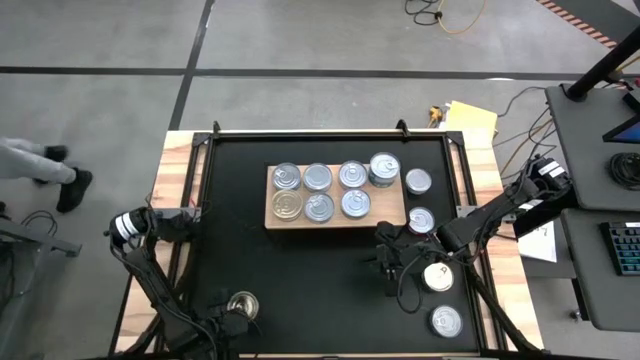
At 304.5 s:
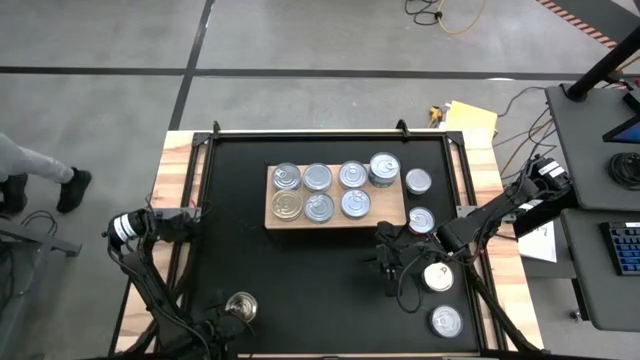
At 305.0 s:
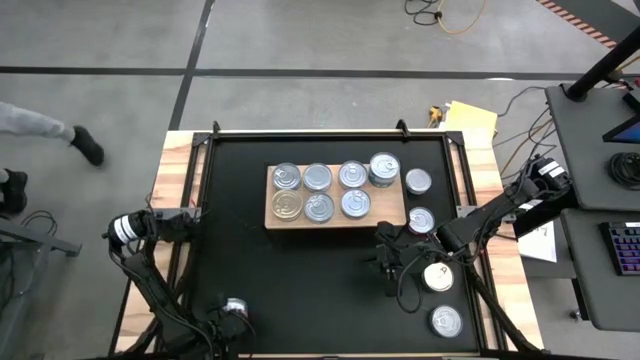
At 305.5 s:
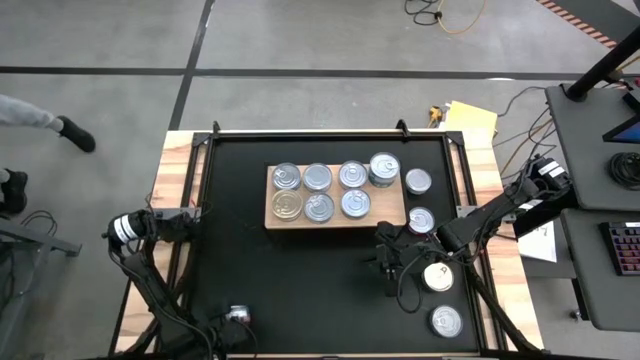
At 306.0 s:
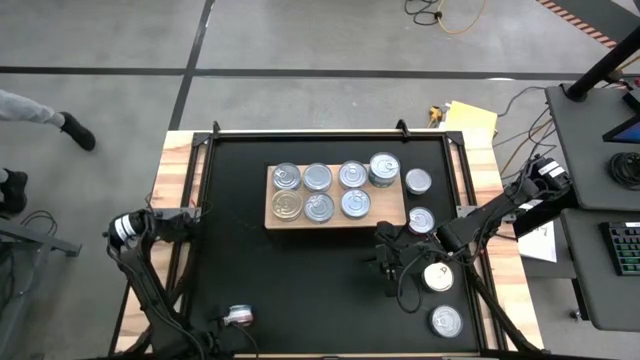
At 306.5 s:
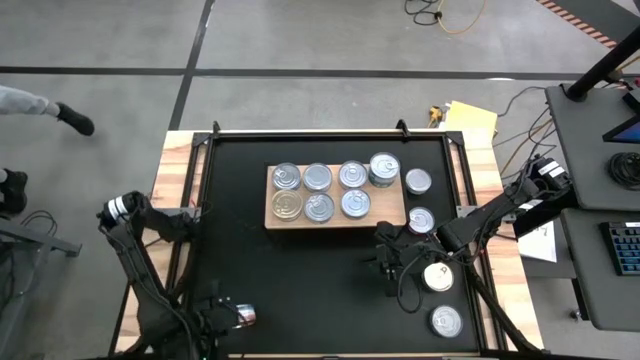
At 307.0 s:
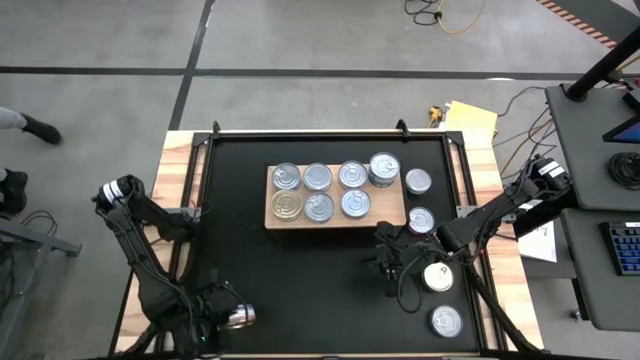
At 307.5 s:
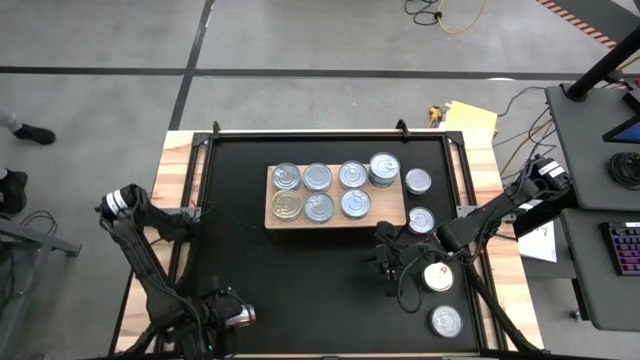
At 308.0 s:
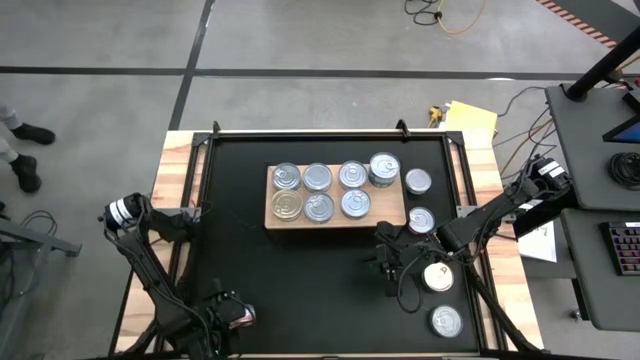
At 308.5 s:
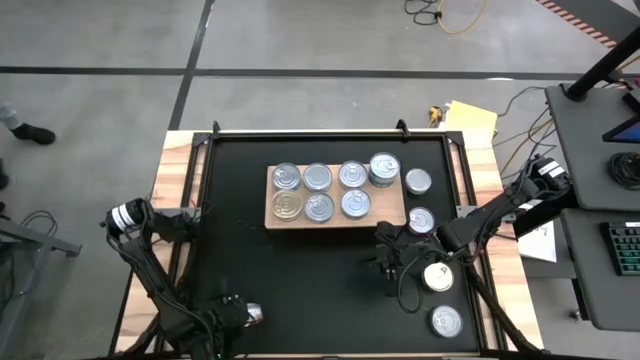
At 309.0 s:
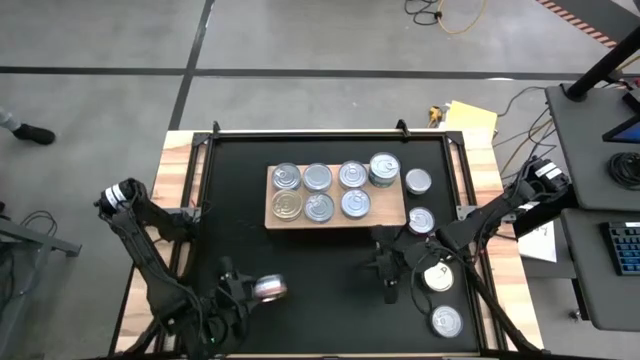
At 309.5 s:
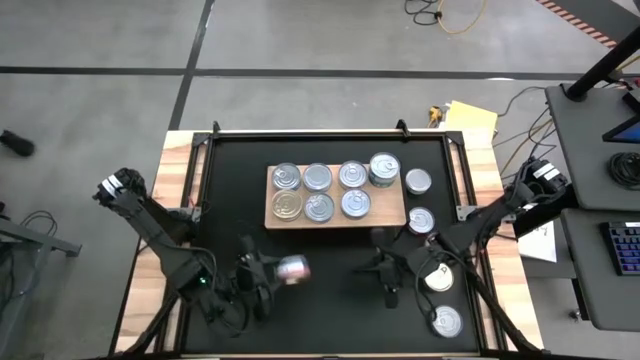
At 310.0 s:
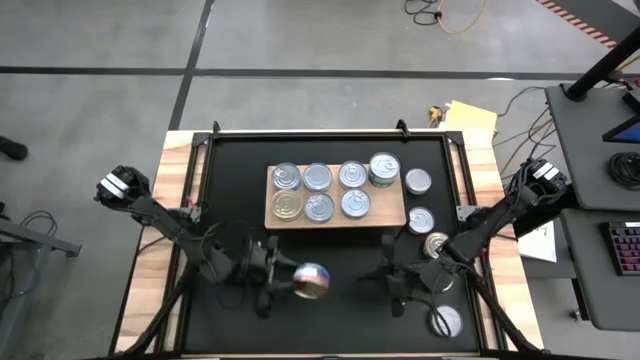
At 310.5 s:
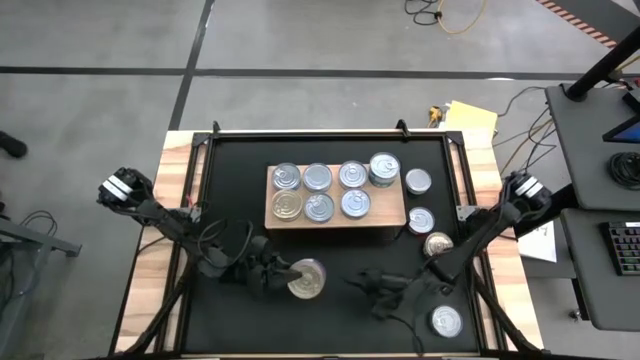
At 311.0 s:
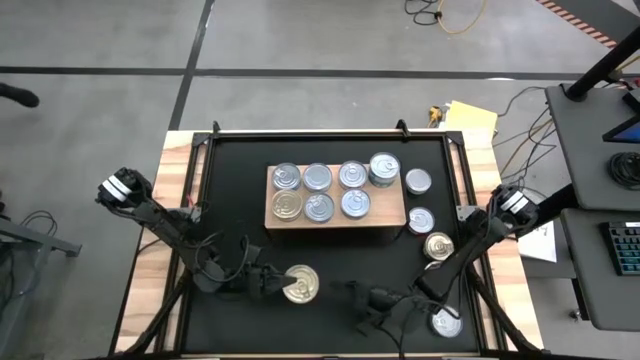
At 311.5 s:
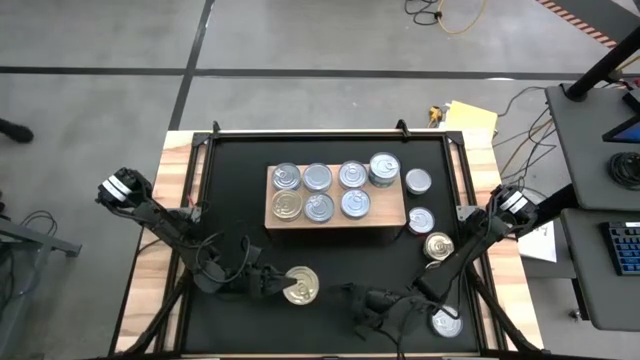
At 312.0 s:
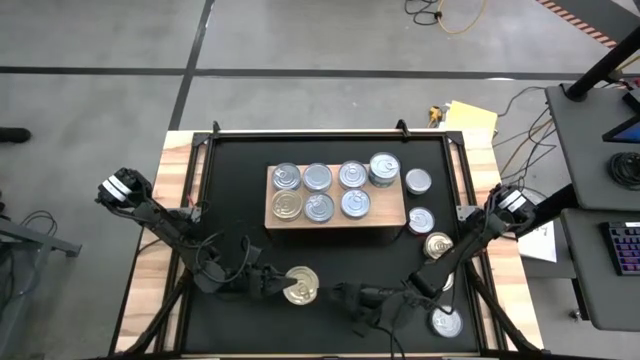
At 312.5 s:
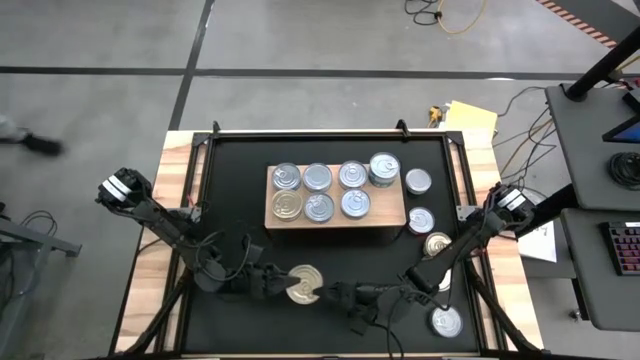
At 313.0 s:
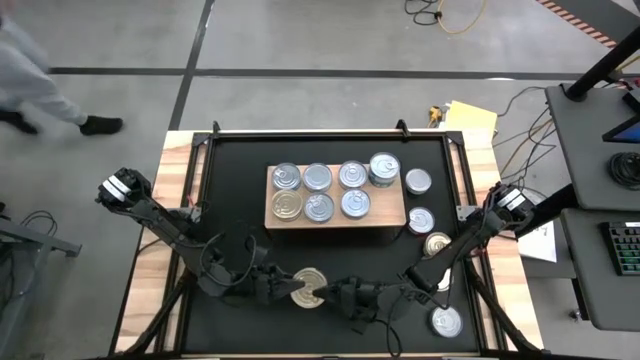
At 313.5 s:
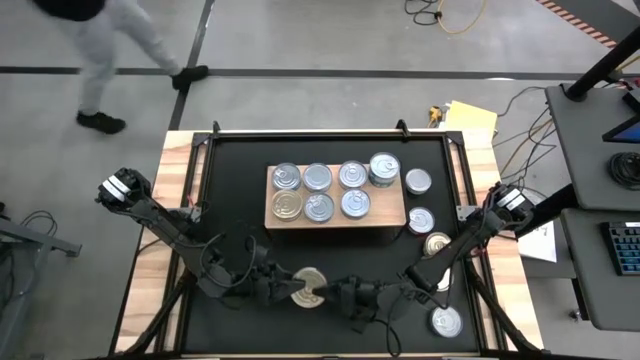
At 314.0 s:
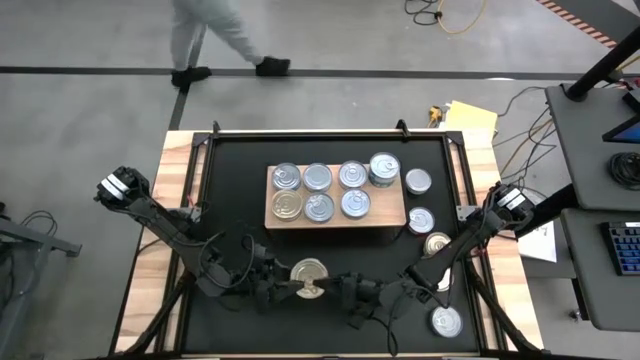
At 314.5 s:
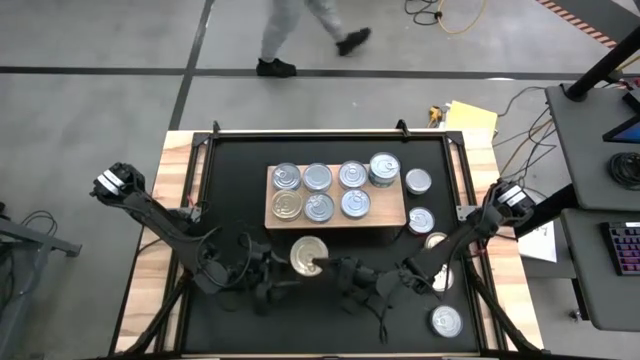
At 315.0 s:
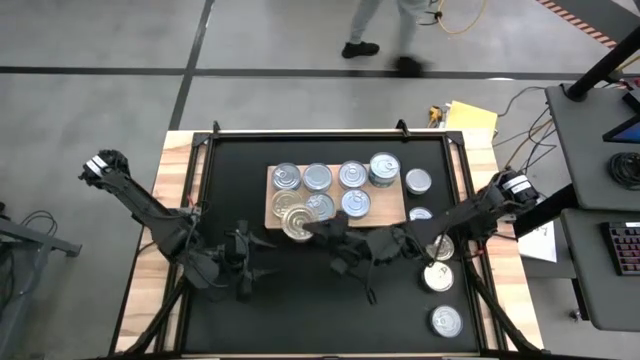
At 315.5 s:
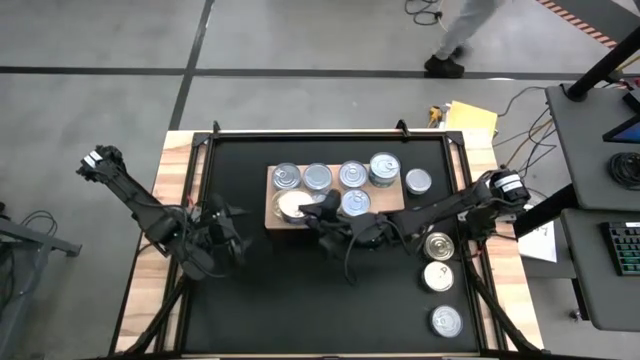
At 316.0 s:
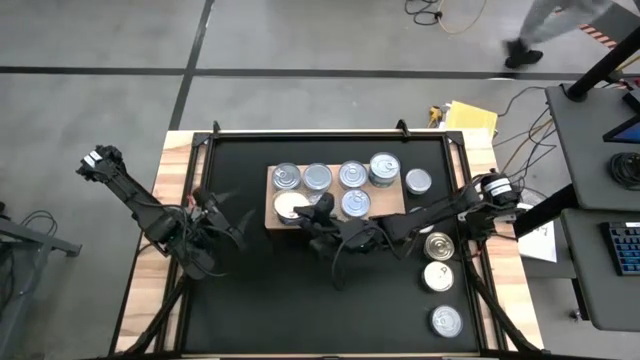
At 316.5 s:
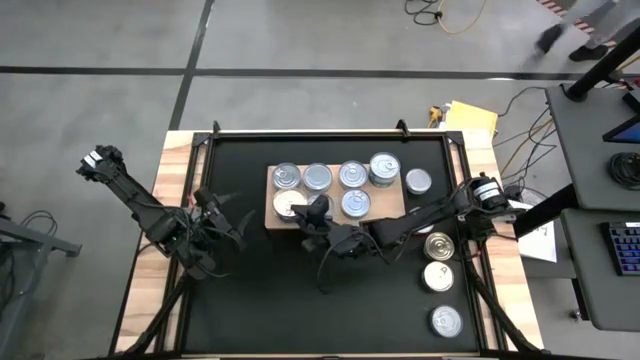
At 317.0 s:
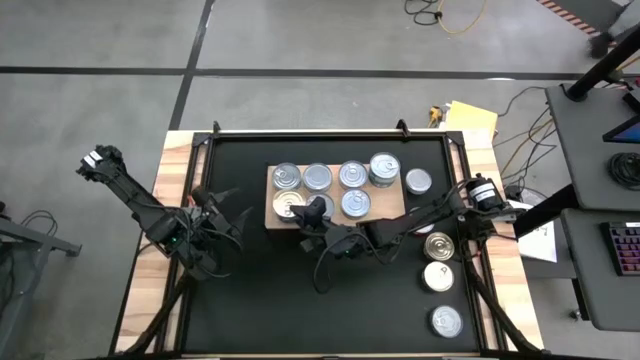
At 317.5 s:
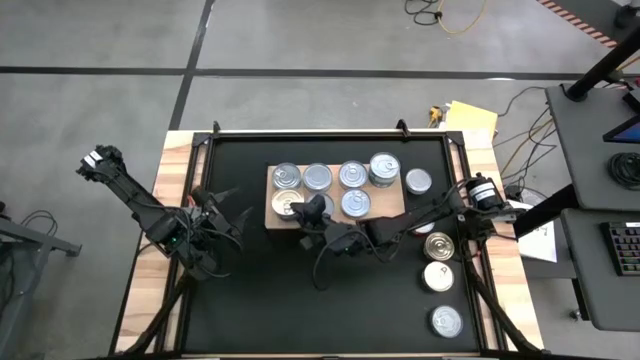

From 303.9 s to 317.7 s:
Task: Stack canned seafood by type on shelf
Stack the blue tuna can on the blue tuna can

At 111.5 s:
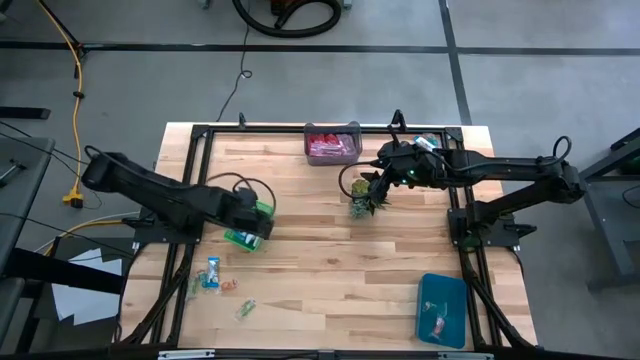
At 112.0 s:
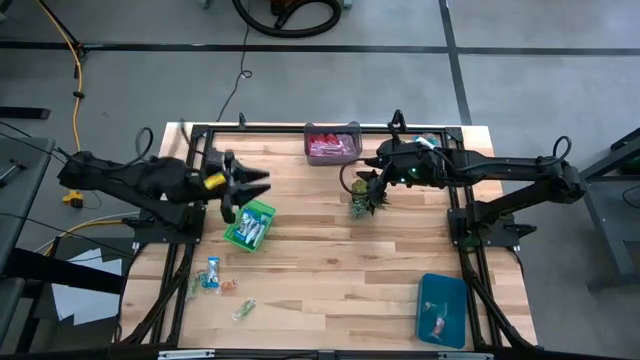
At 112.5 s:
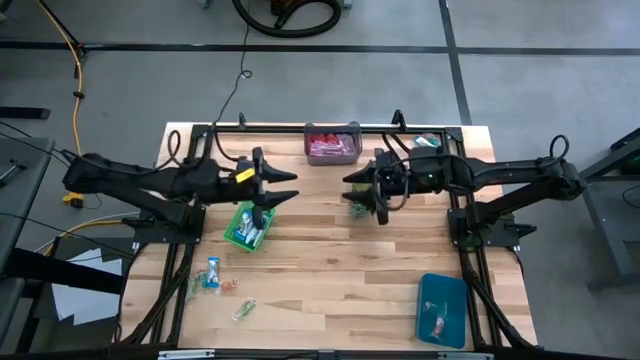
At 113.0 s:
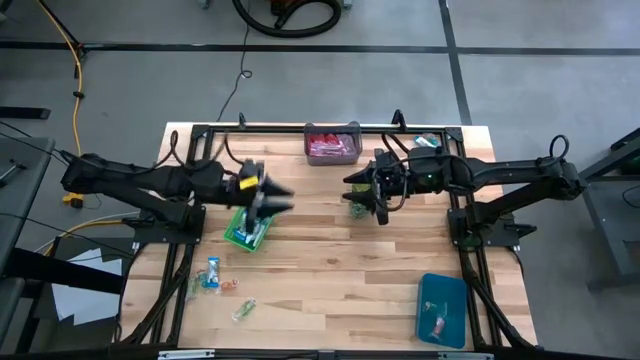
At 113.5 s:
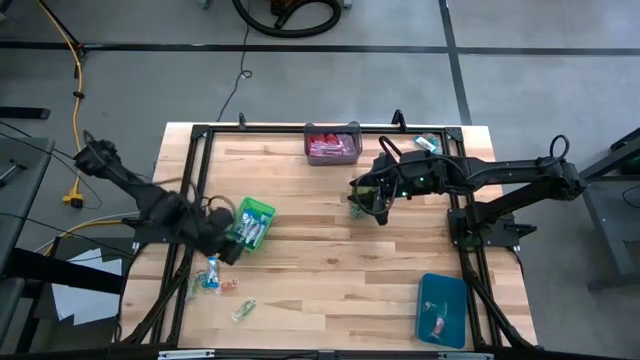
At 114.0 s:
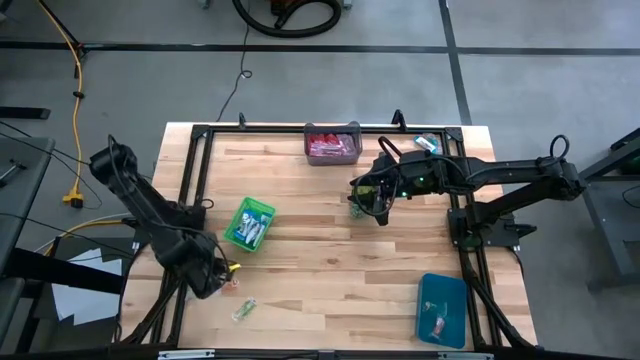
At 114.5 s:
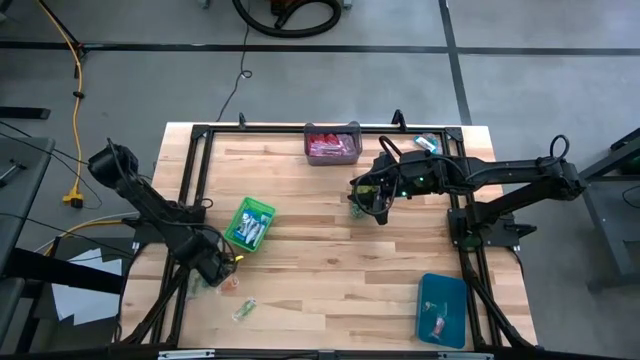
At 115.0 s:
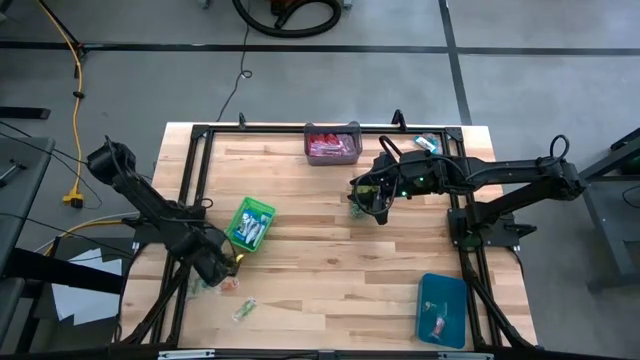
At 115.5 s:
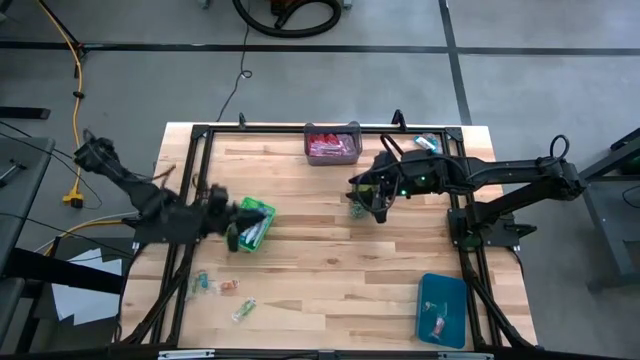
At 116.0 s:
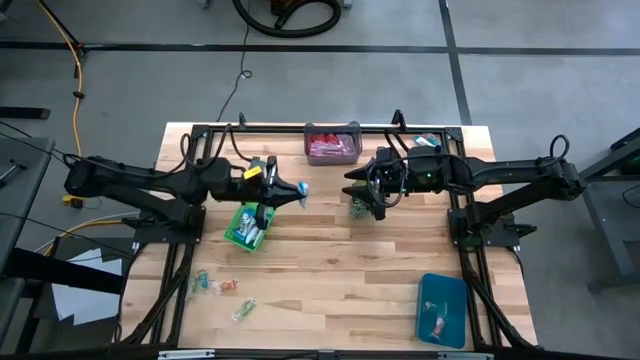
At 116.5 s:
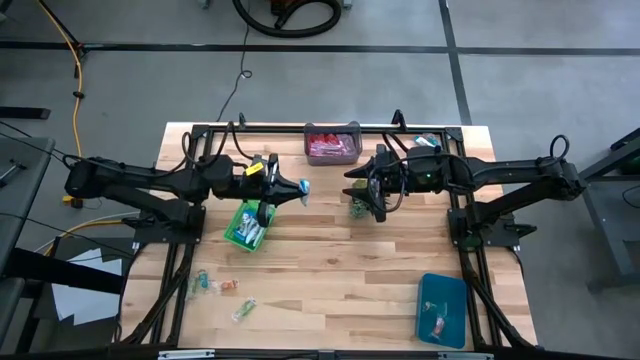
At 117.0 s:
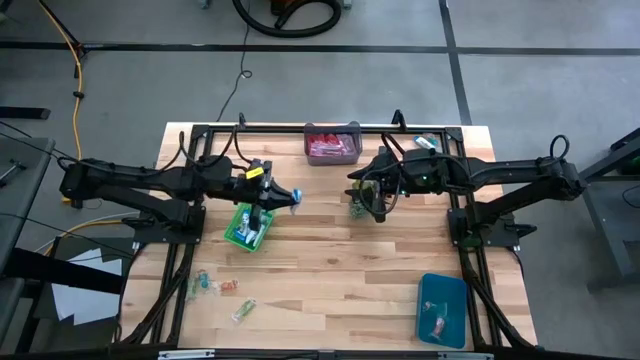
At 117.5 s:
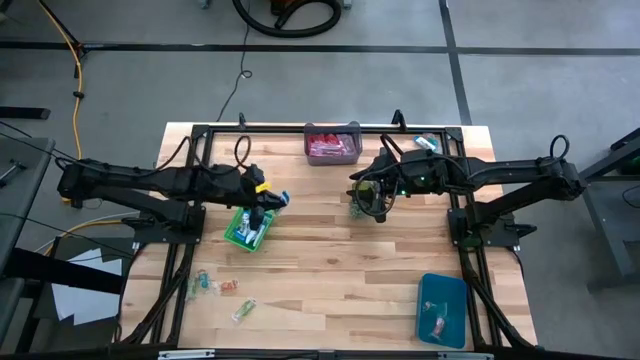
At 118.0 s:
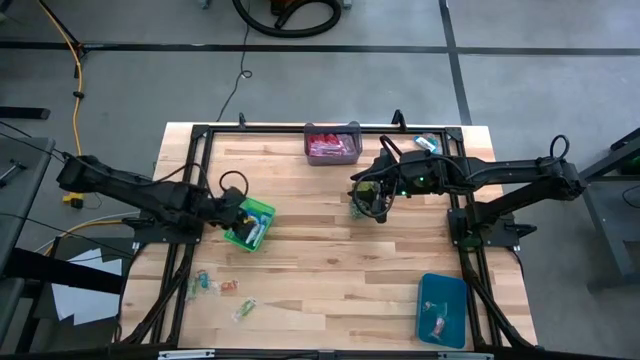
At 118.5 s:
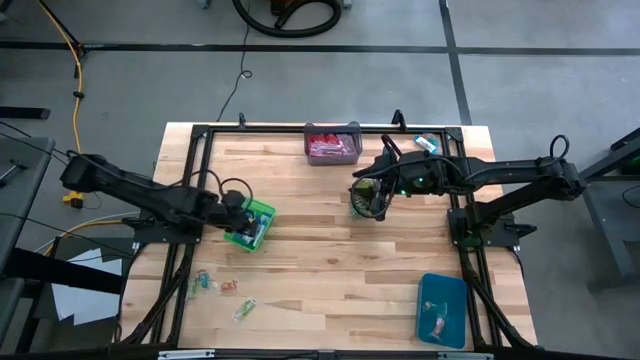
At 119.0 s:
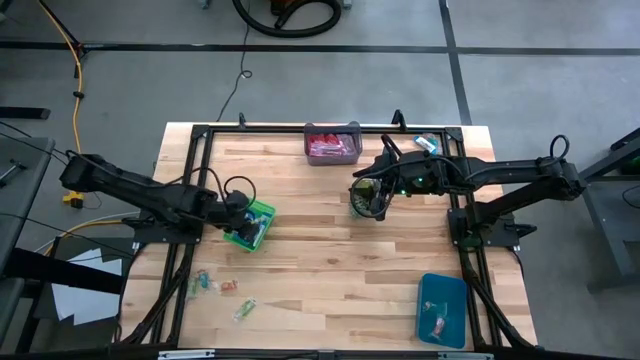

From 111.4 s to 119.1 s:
Task: Sort candy
Put the white candy into the green bin
